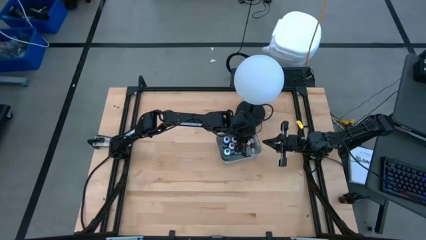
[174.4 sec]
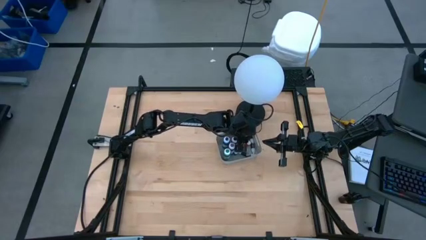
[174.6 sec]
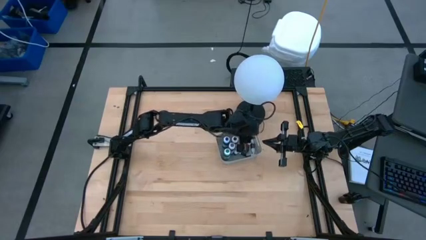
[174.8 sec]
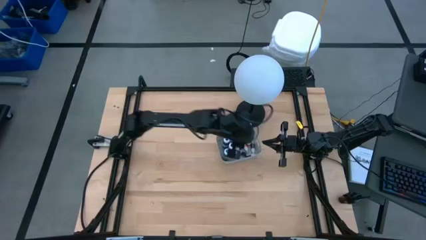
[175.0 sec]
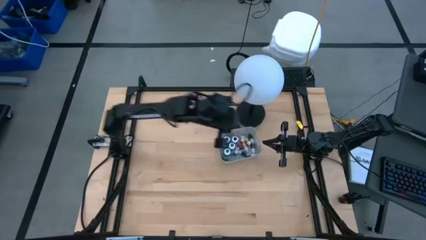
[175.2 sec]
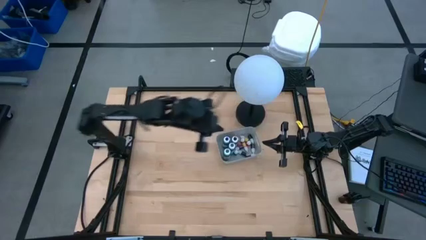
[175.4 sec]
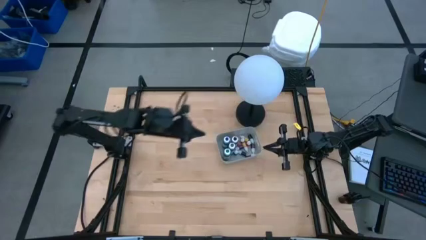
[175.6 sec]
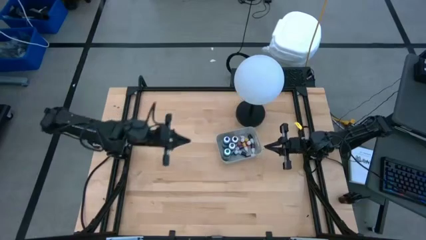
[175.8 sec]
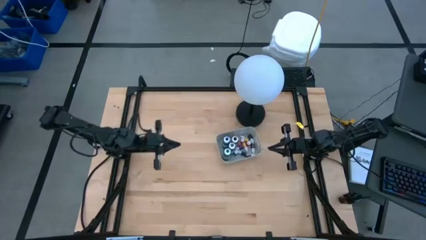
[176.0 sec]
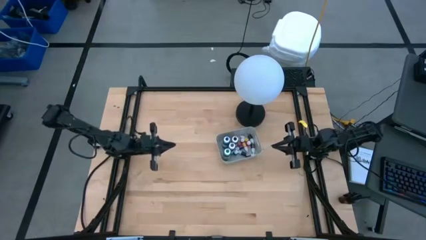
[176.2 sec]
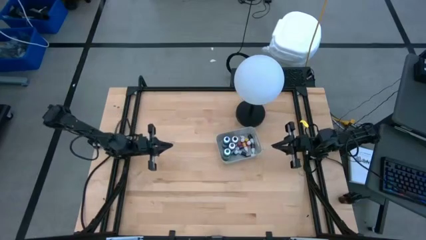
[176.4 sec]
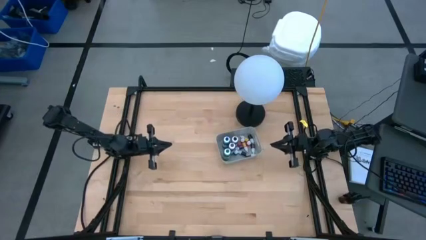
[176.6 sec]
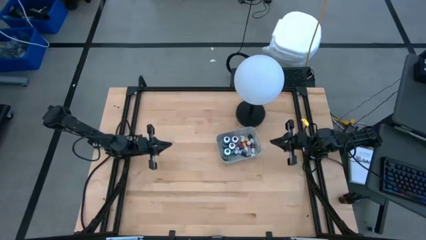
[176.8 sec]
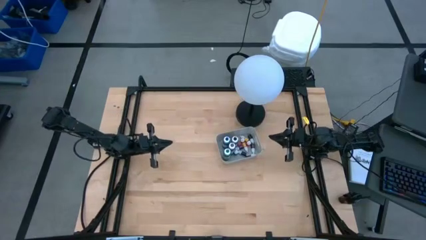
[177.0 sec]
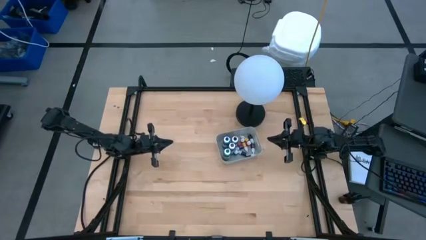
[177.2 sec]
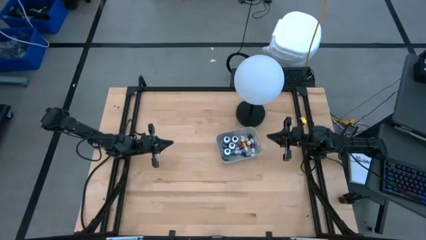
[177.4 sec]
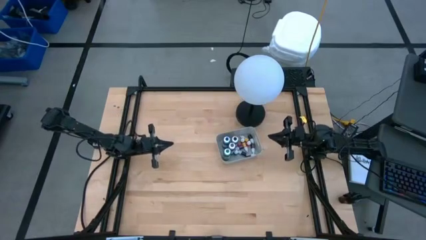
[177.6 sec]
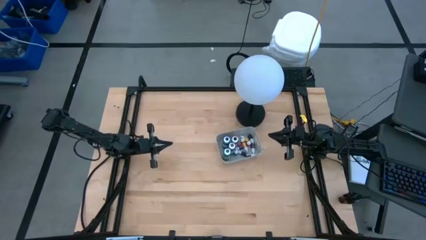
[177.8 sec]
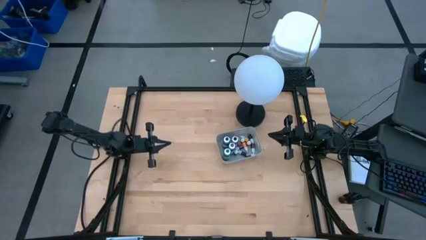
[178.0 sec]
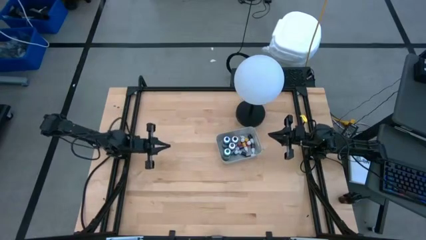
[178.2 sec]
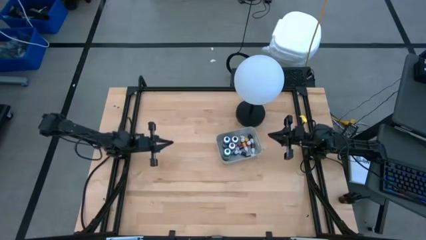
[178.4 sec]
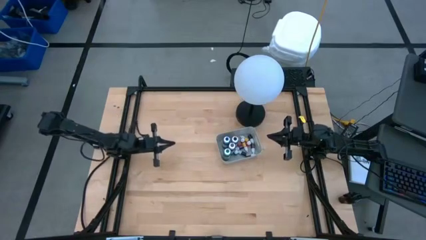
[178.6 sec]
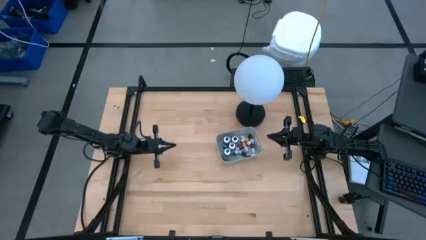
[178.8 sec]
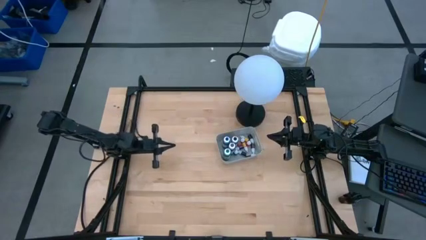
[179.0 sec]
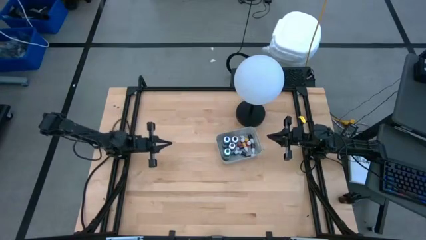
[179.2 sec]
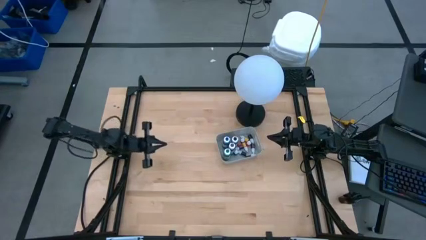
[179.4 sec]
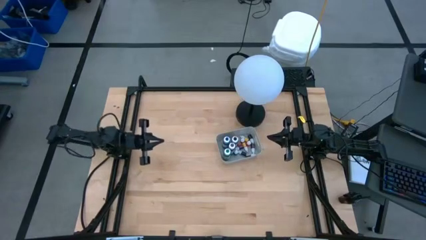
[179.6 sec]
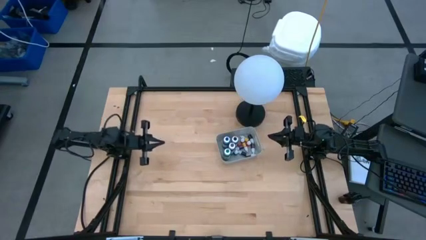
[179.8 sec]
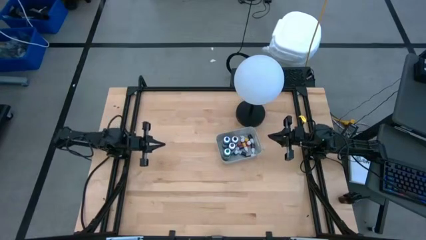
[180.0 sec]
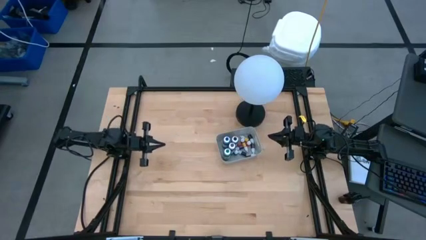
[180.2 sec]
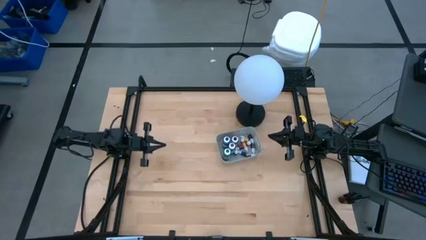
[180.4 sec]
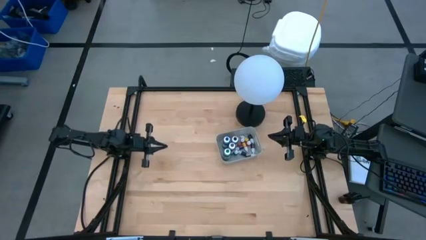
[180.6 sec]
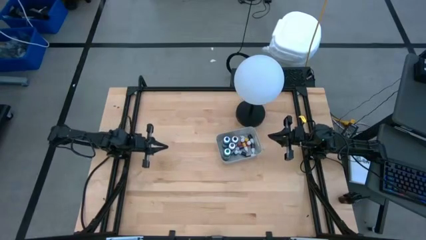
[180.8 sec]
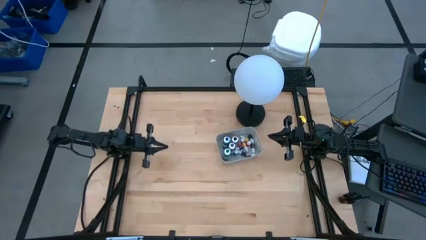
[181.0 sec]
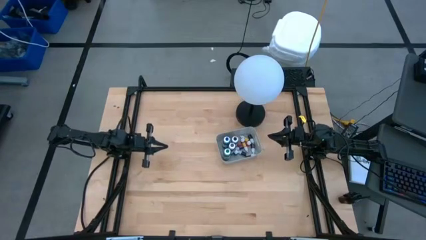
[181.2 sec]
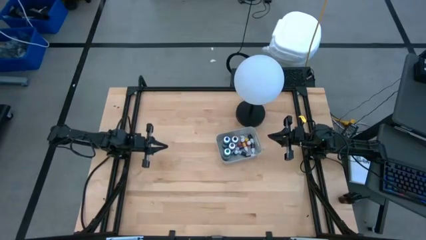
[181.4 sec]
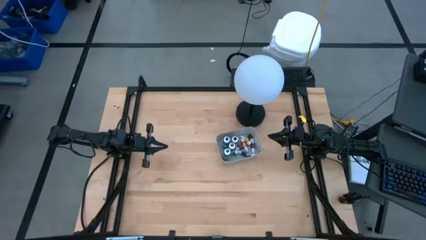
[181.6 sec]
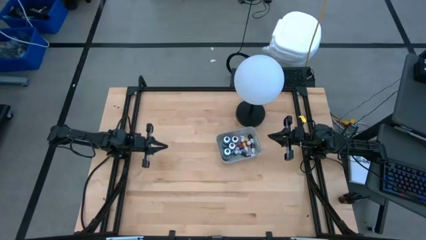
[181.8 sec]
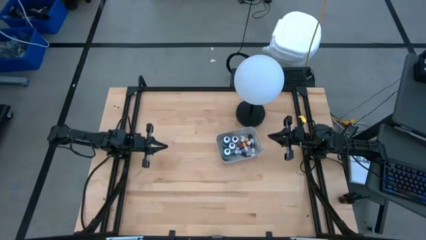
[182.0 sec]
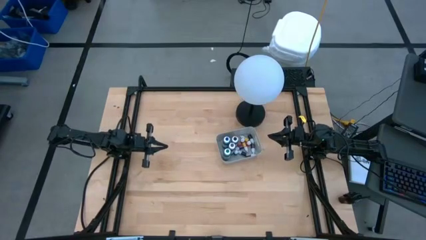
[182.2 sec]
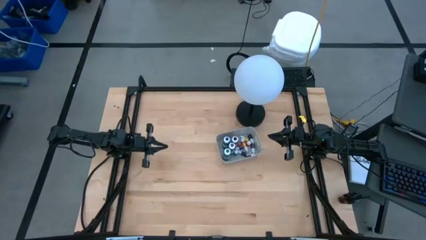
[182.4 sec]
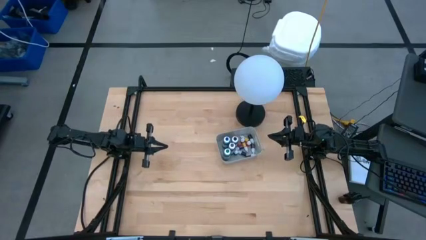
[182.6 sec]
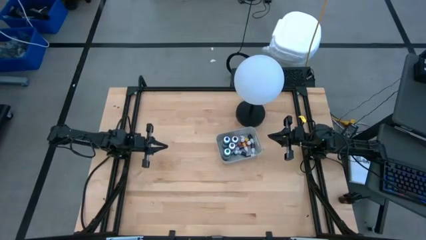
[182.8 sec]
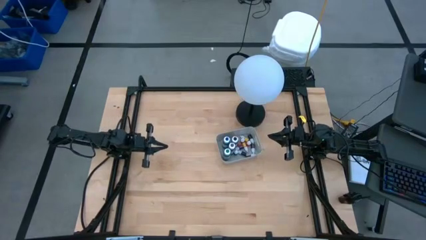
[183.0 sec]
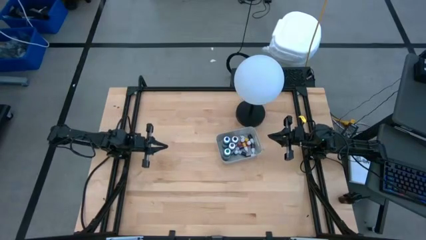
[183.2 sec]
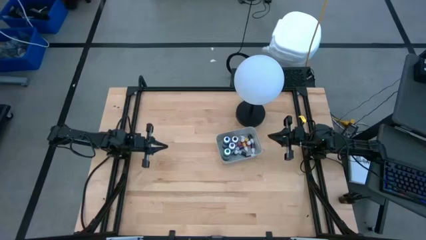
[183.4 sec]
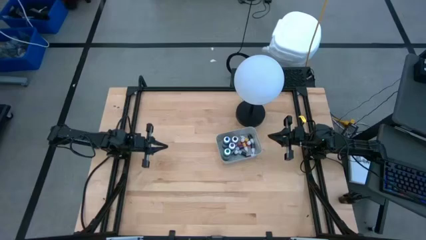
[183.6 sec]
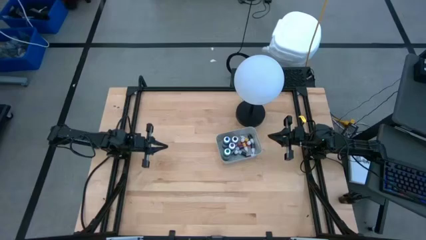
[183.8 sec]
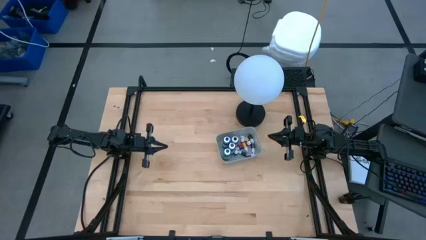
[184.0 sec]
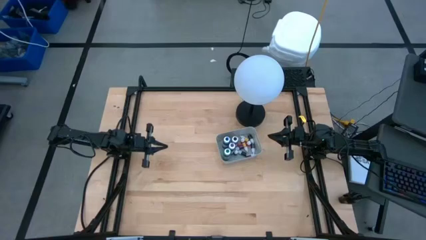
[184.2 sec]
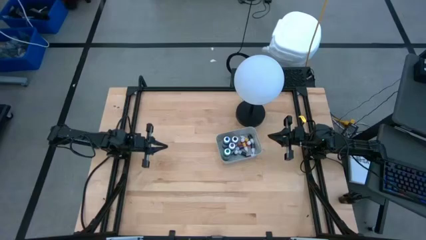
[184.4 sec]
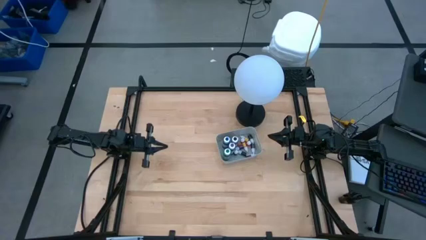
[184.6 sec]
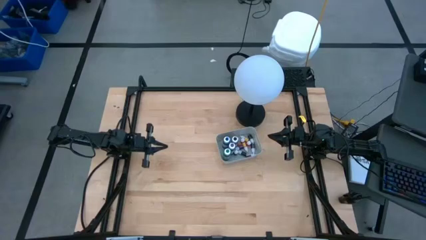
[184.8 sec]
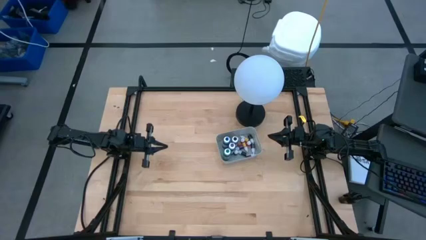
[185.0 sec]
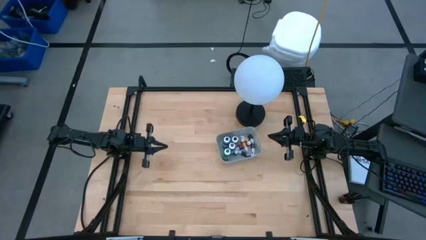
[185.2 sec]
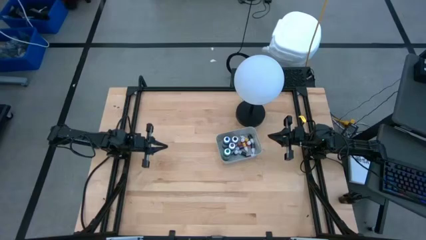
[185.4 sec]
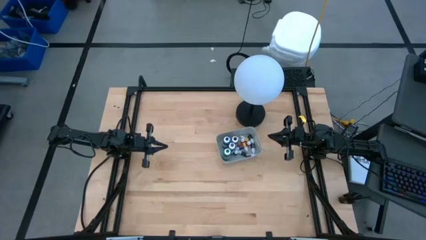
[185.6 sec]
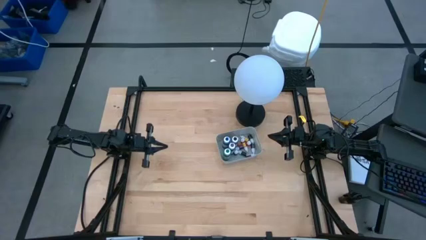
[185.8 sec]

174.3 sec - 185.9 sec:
Task: Pick & Place food coloring
Return to Home Position

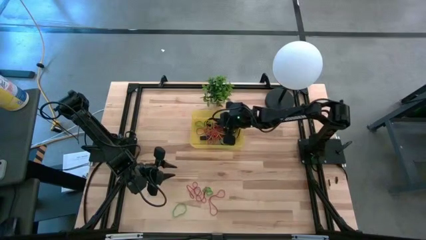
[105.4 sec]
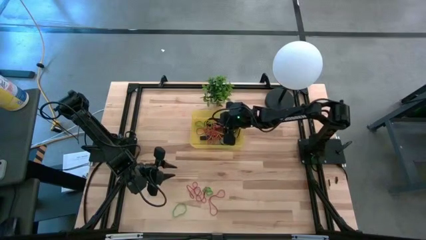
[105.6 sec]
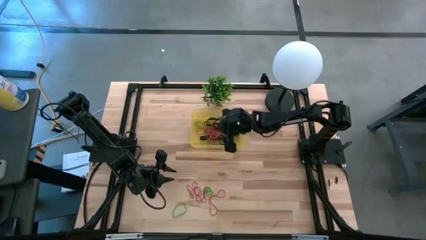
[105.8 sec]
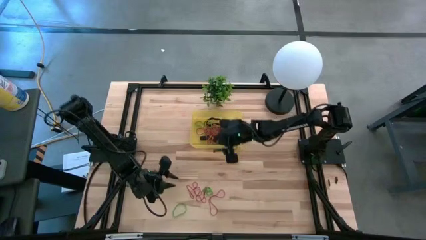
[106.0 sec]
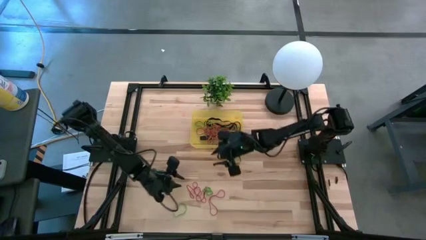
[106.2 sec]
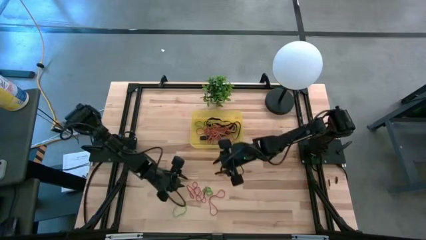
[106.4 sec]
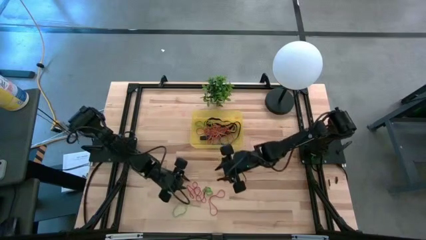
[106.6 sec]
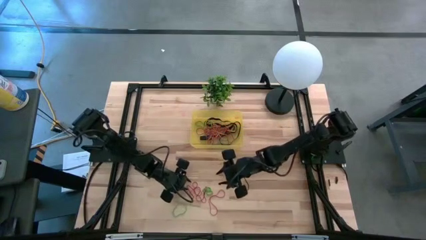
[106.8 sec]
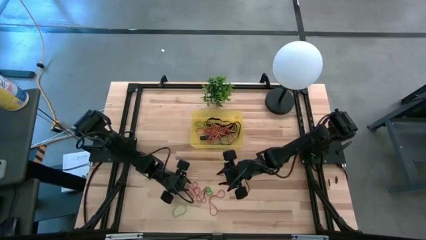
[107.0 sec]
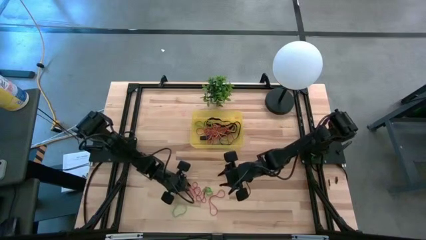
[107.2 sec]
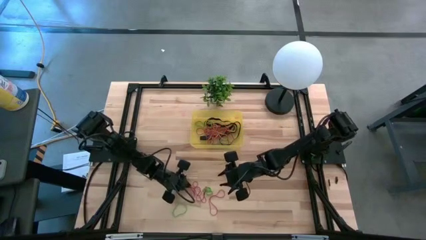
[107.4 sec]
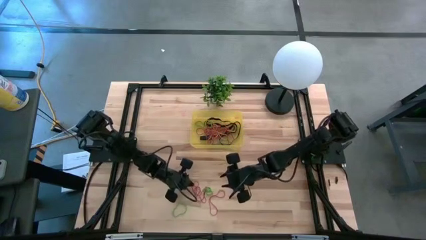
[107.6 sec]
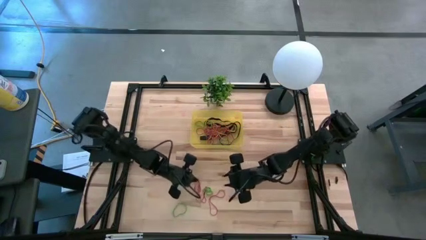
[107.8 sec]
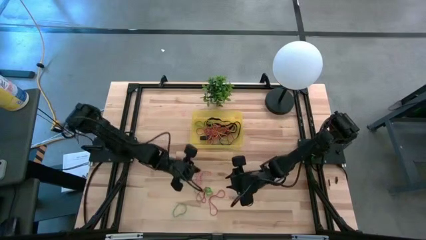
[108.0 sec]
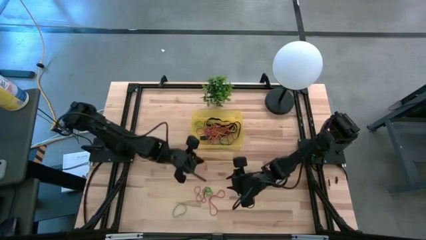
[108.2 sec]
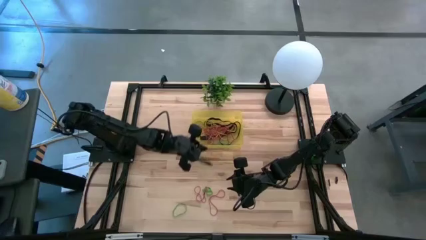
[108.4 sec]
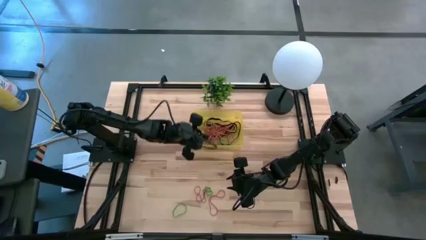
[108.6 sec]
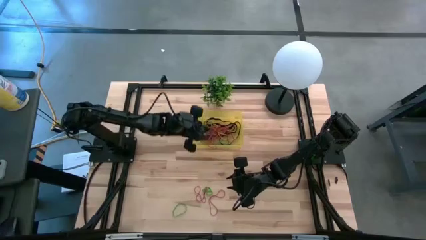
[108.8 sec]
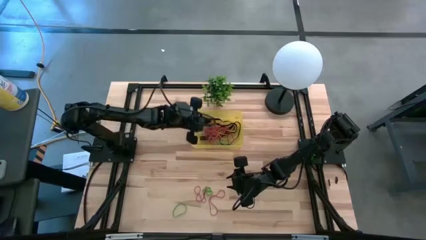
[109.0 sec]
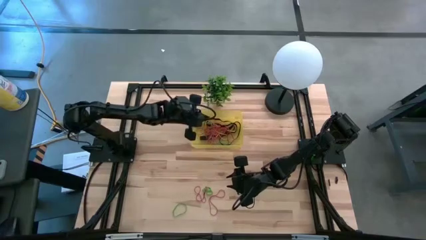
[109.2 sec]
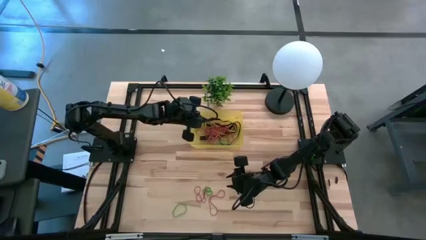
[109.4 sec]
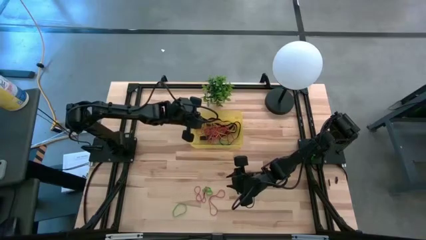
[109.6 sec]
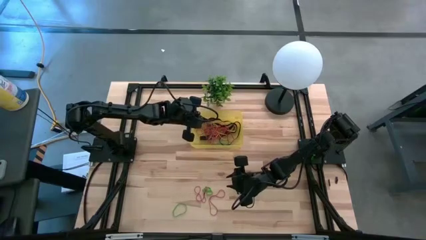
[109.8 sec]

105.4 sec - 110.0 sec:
Task: Pick and place rubber bands into bin
Put the red rubber band into the yellow bin
